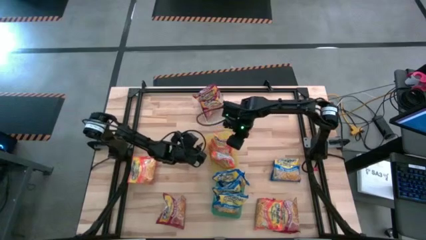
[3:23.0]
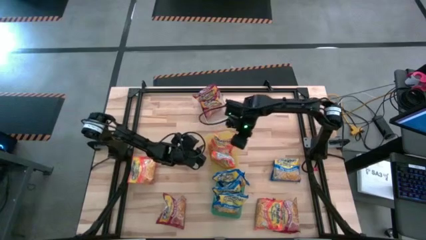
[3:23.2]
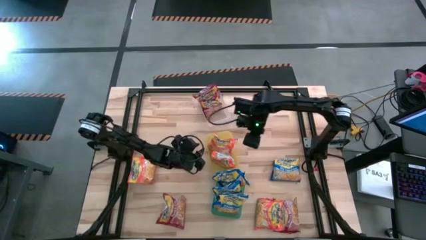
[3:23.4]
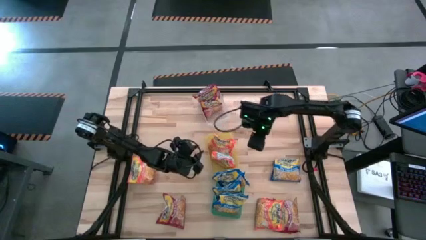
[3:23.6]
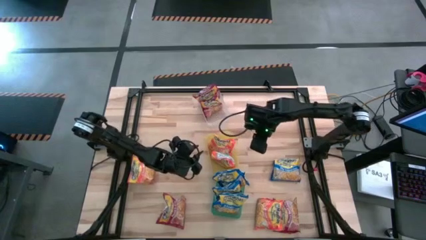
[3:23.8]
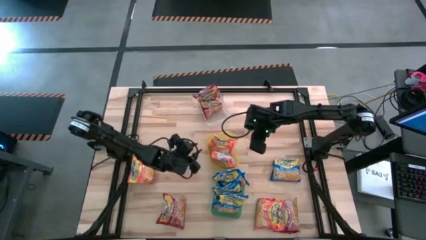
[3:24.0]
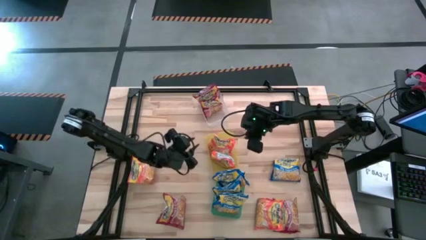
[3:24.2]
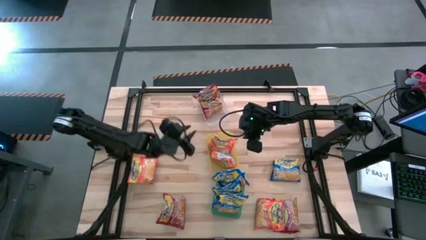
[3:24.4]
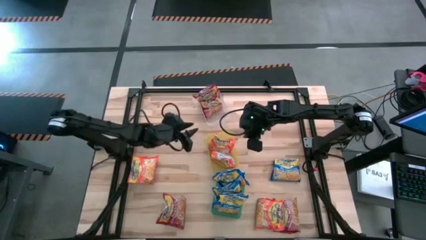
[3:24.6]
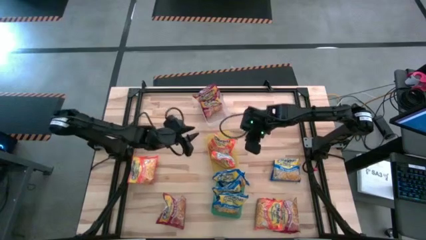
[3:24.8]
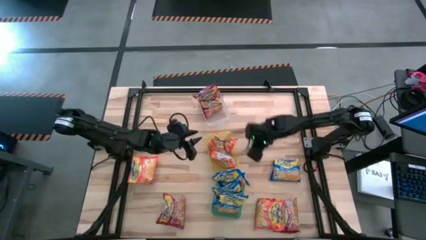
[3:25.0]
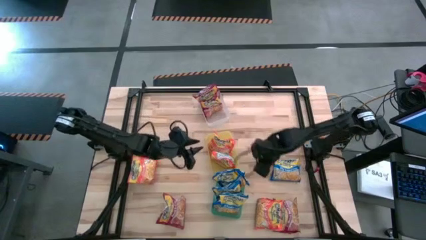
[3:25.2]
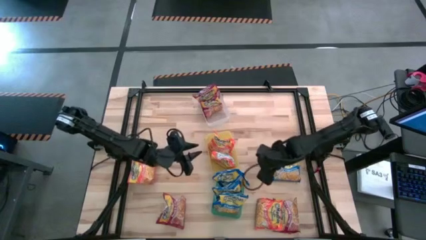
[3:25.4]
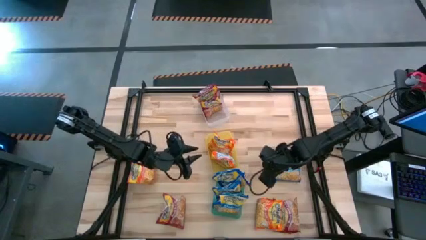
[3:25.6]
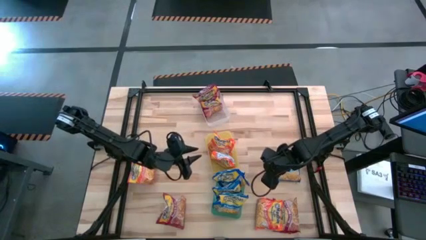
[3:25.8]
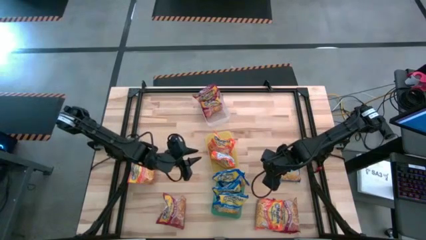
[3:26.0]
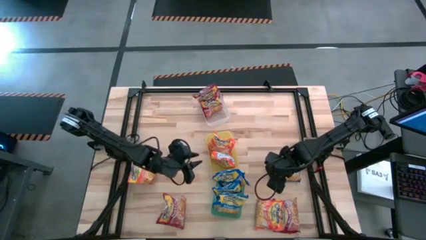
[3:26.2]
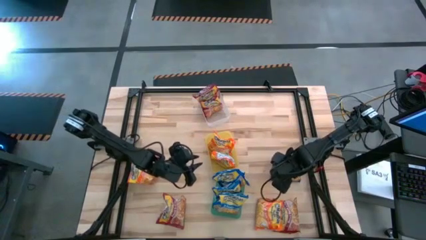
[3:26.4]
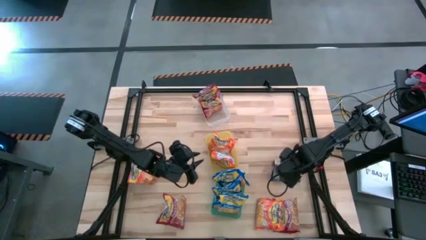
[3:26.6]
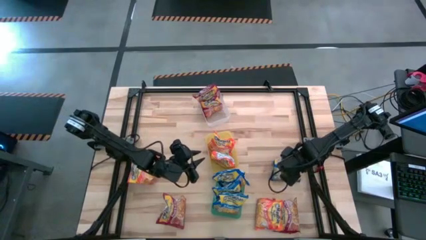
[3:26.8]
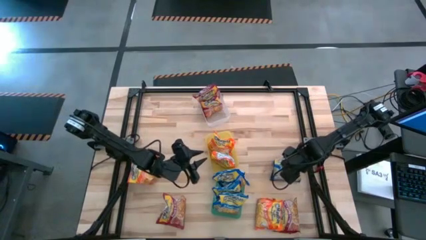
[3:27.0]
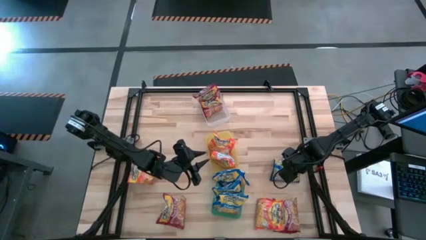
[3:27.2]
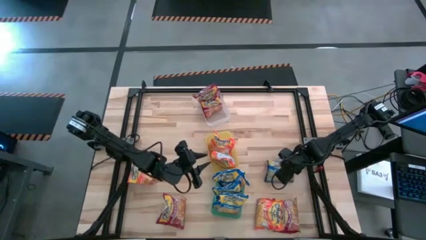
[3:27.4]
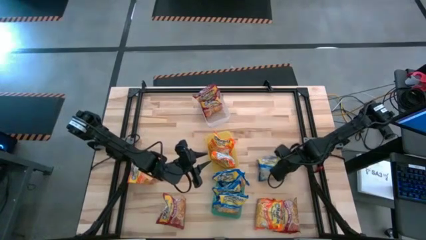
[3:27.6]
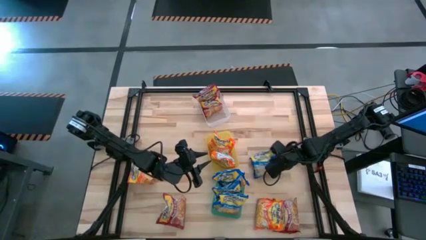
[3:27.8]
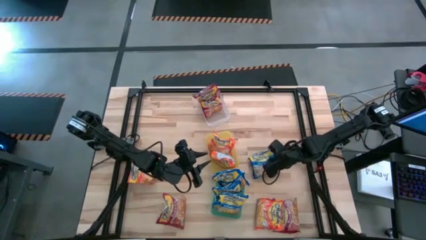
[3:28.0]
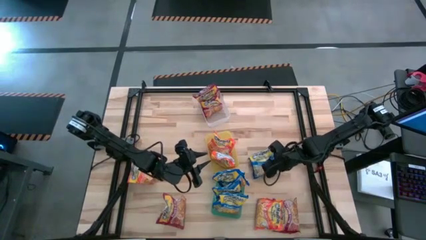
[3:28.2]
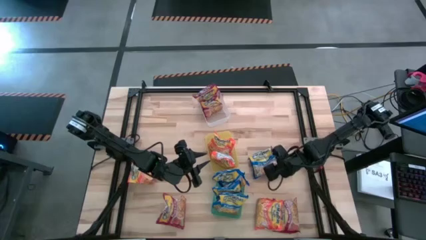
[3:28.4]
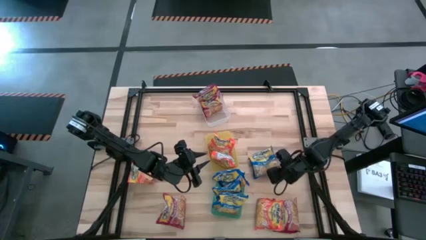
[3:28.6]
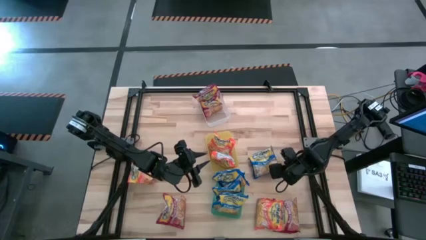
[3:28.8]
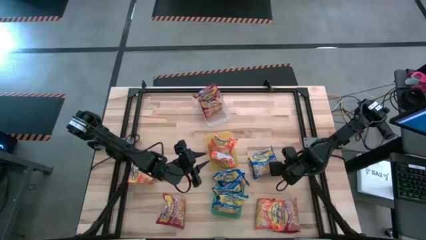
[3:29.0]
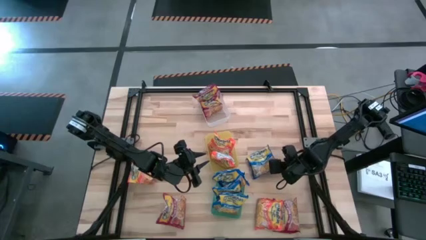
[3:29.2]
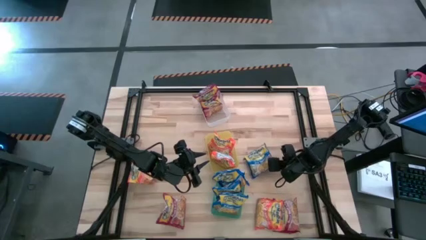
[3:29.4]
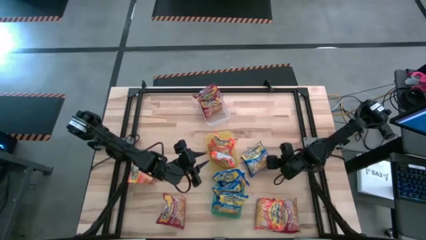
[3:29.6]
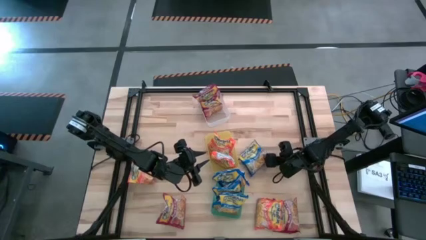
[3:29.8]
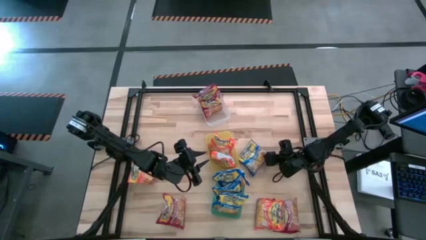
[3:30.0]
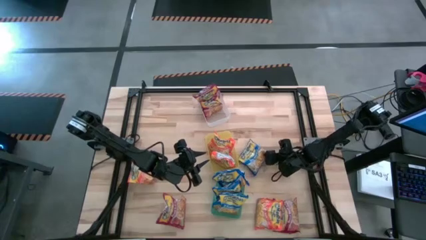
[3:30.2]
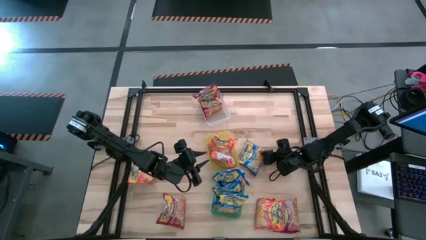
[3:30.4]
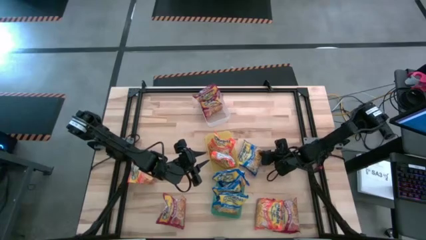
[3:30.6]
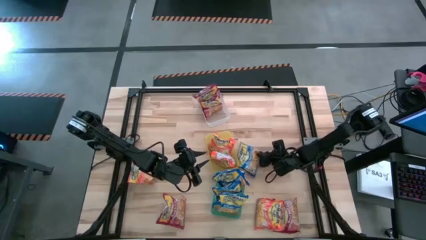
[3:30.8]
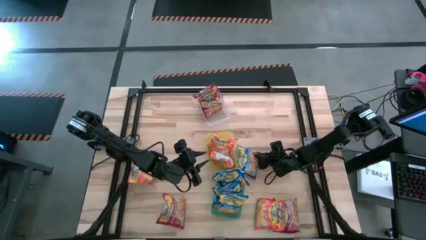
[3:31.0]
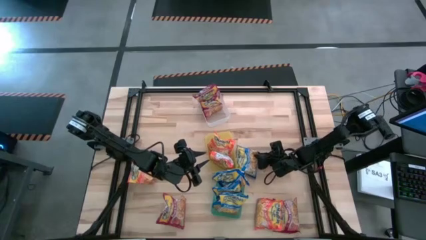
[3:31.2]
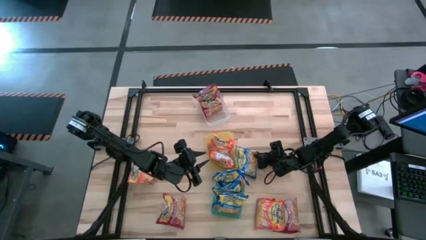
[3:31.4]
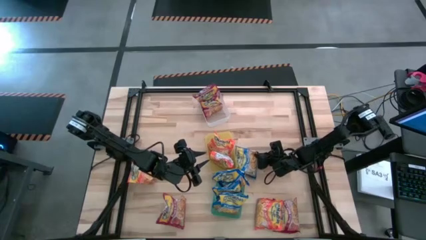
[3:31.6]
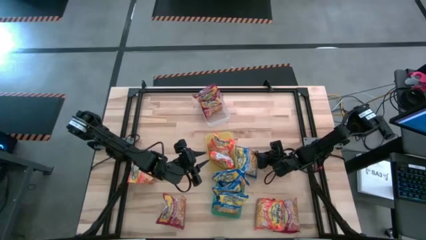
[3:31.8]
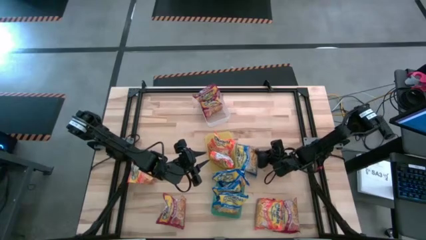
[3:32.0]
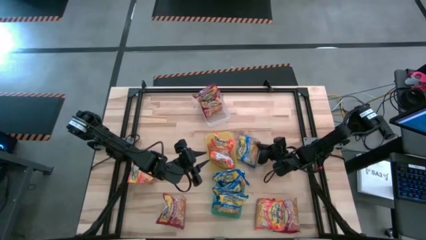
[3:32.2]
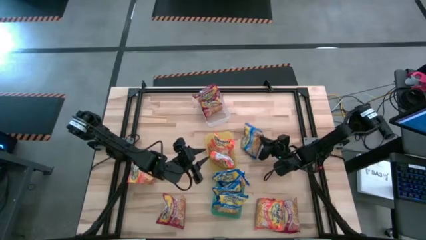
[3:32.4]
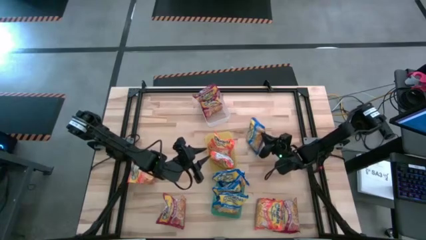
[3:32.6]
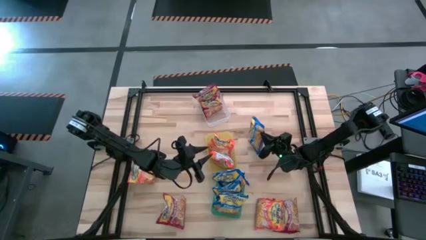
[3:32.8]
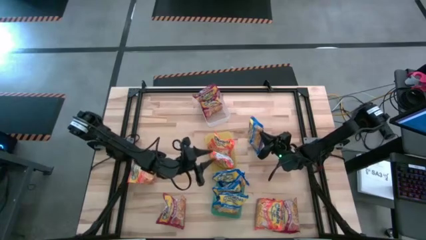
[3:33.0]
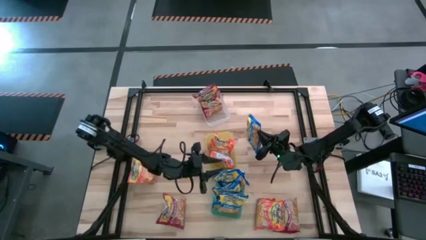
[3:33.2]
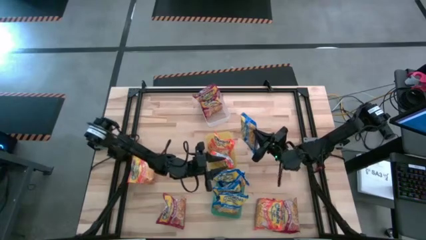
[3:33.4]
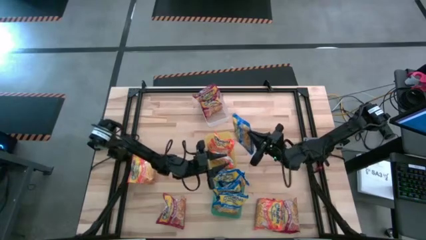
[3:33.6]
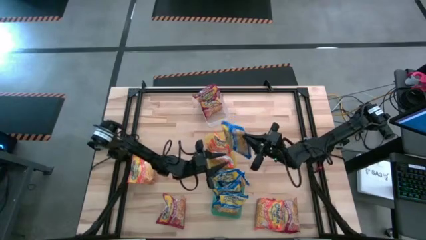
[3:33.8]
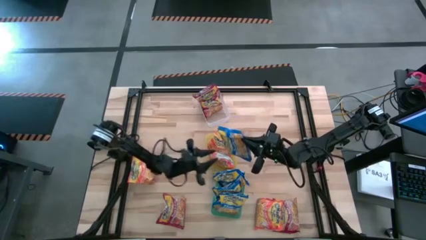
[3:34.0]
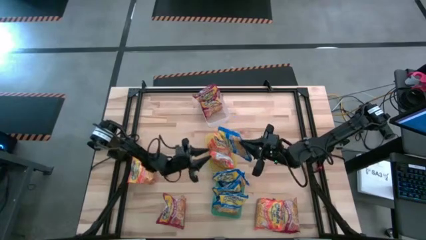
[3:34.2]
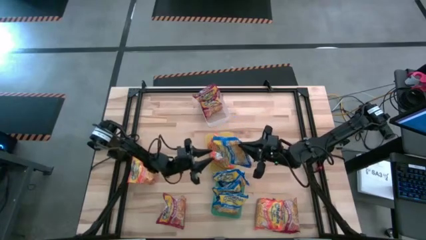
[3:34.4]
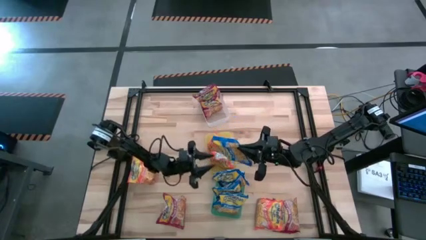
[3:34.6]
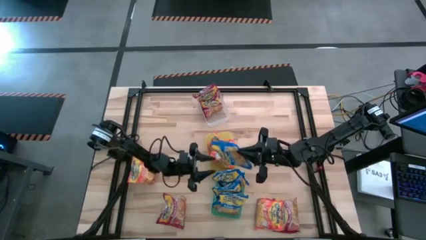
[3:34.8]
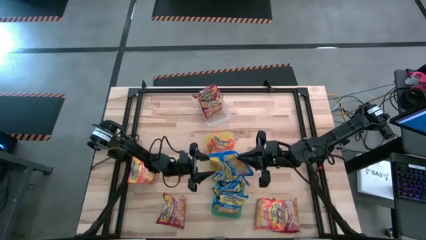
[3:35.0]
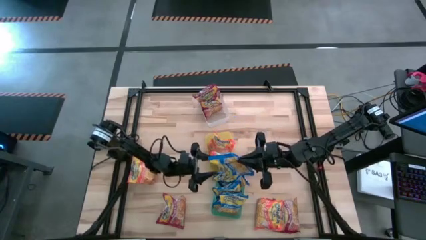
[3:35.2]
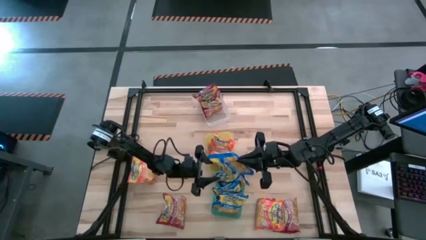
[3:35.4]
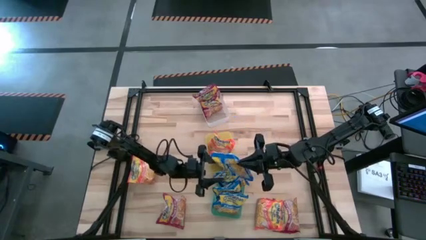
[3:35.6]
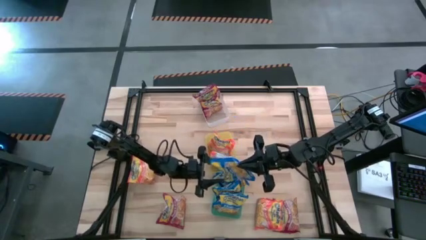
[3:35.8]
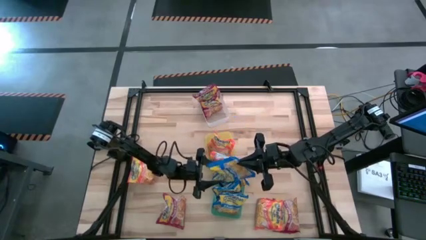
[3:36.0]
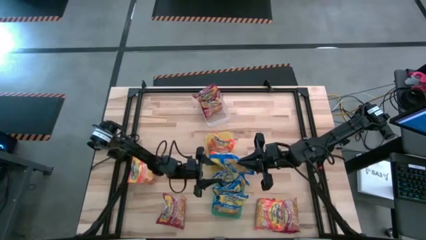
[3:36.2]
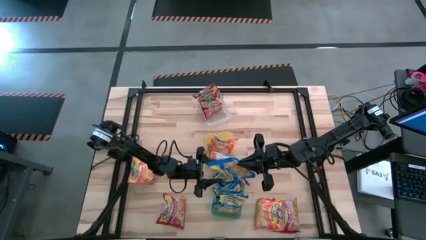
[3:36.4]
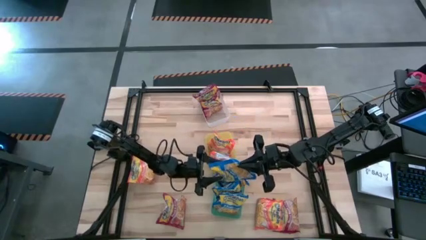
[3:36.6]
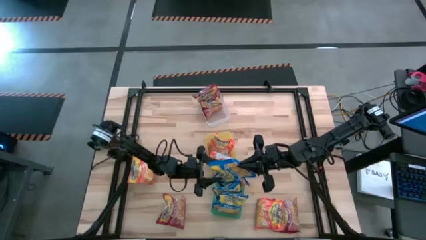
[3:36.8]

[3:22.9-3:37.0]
Task: Sort Maruchan noodles
Put the blue noodle pack into the green bin
